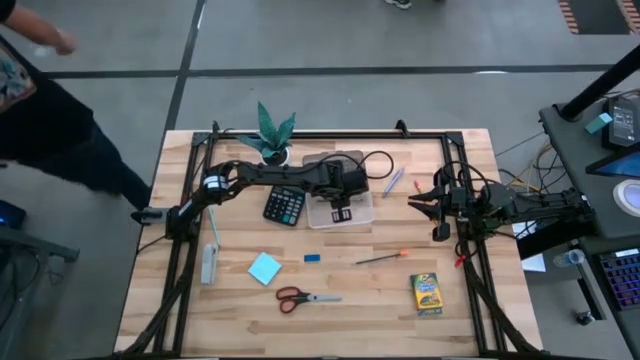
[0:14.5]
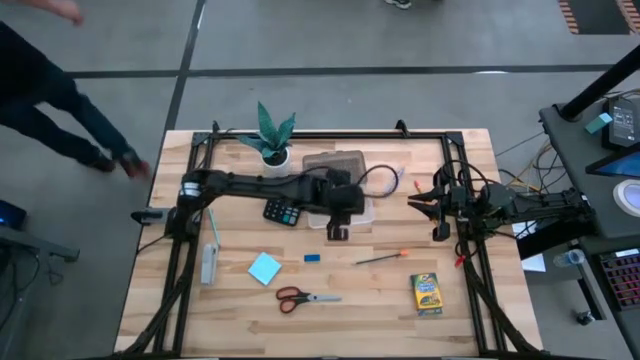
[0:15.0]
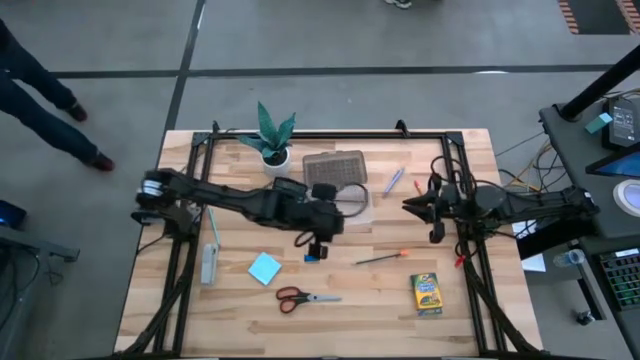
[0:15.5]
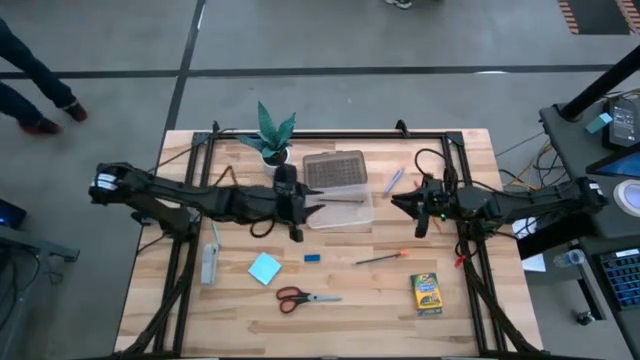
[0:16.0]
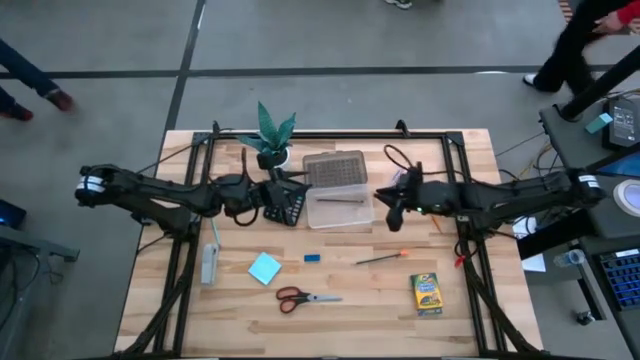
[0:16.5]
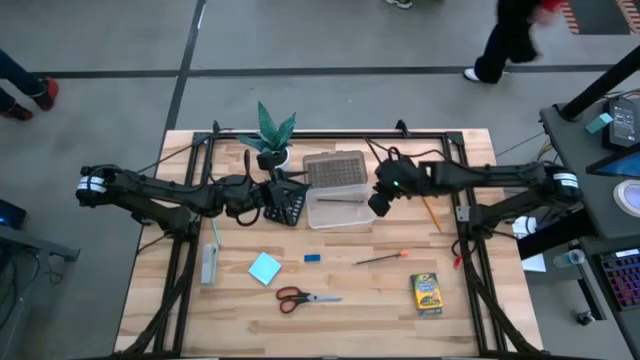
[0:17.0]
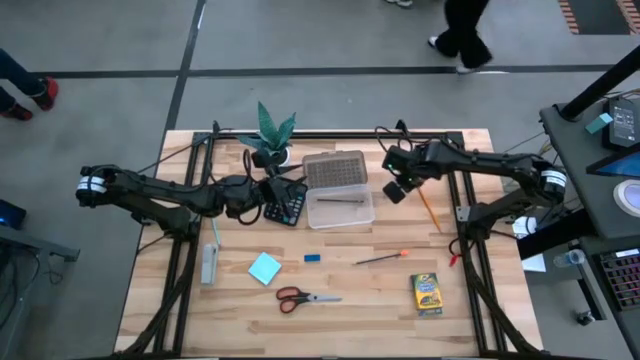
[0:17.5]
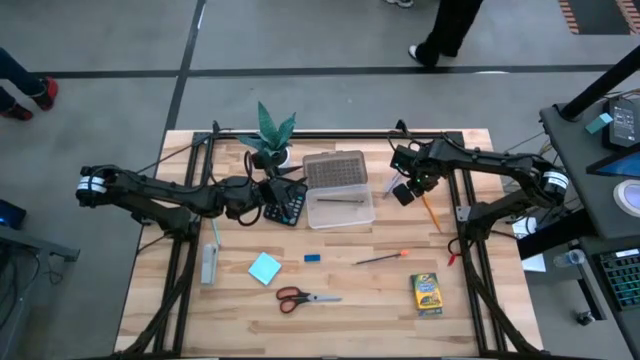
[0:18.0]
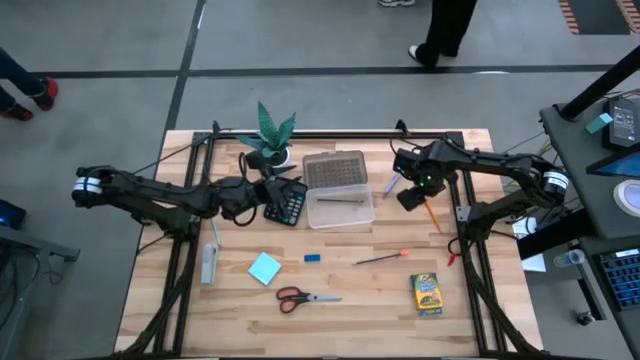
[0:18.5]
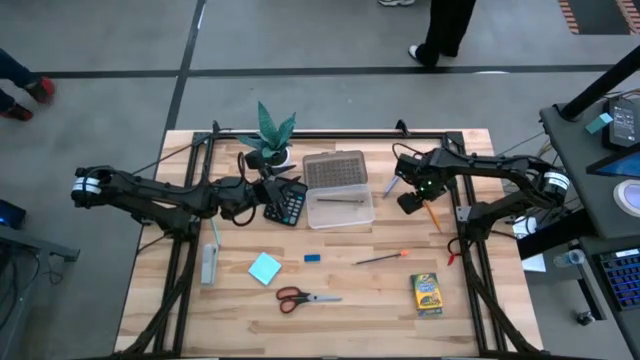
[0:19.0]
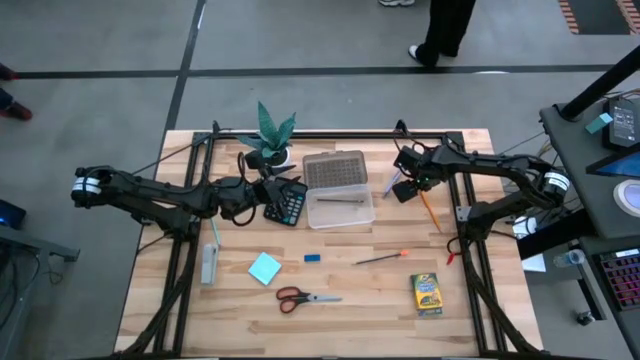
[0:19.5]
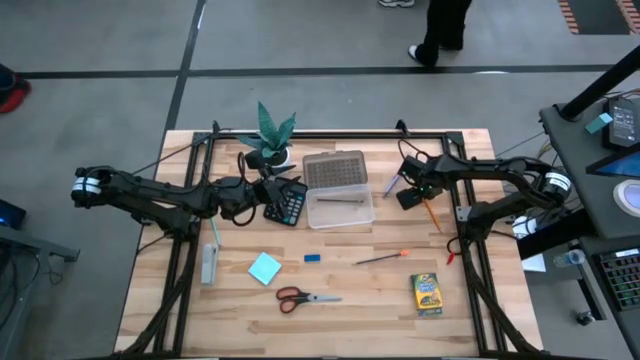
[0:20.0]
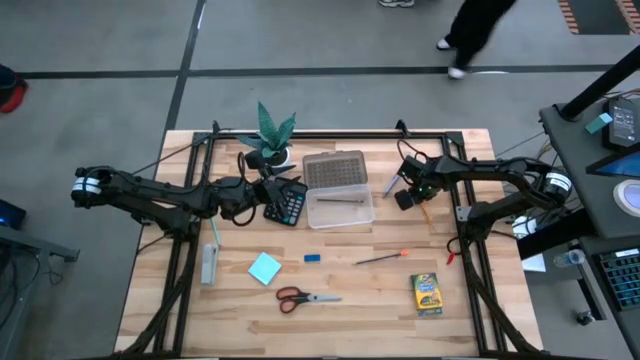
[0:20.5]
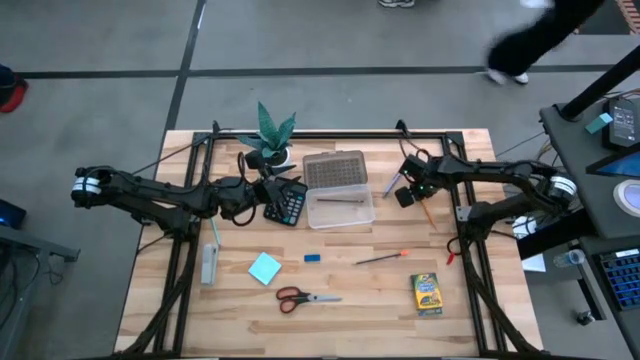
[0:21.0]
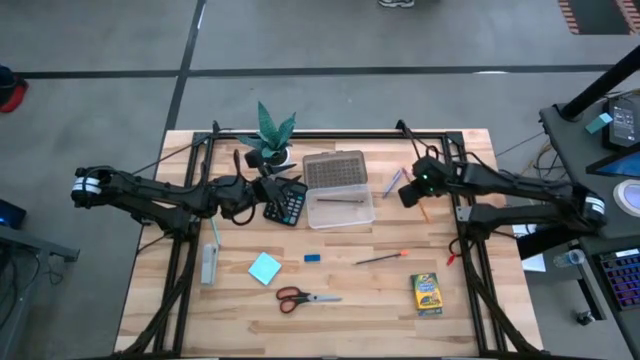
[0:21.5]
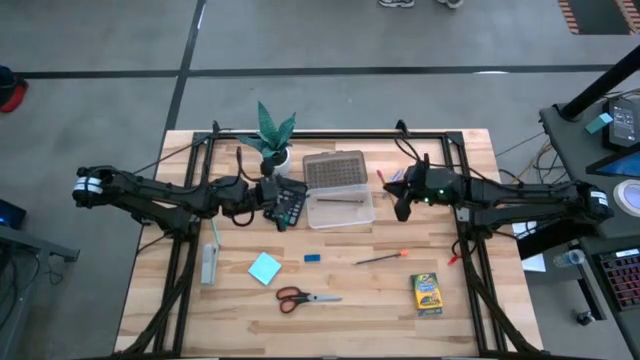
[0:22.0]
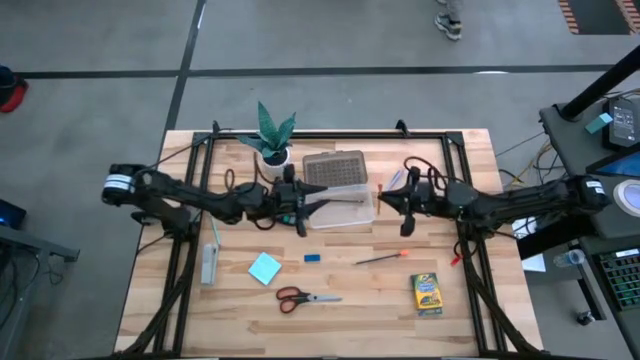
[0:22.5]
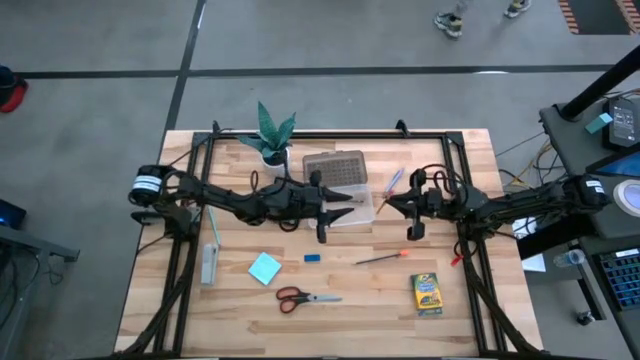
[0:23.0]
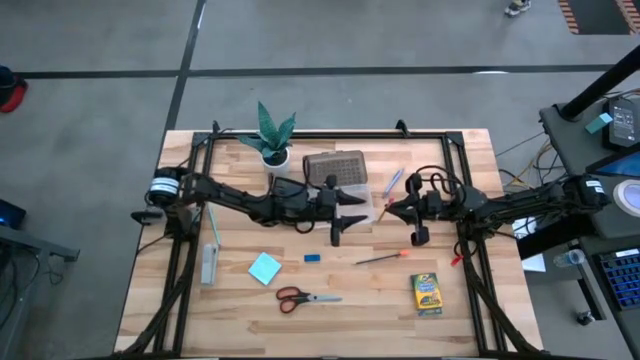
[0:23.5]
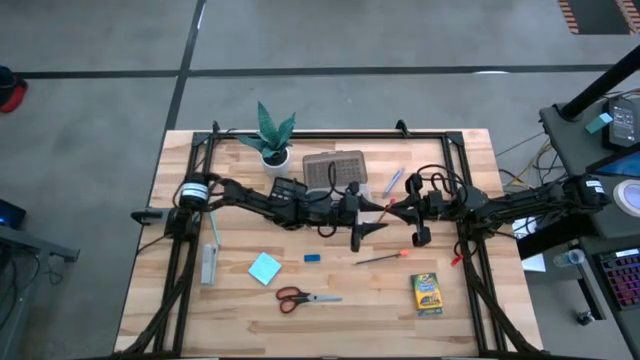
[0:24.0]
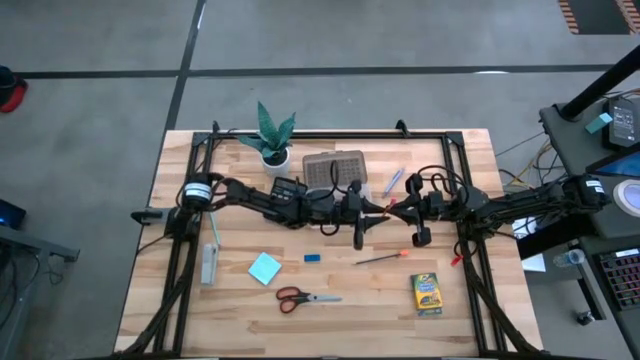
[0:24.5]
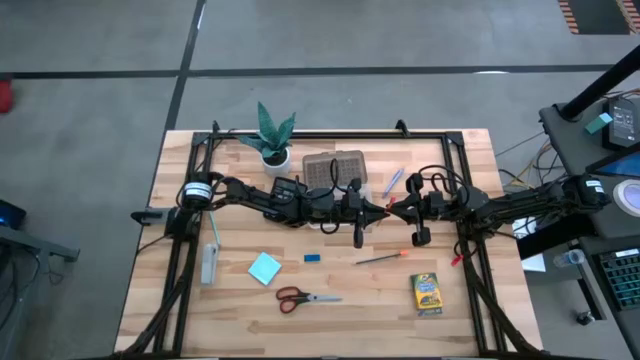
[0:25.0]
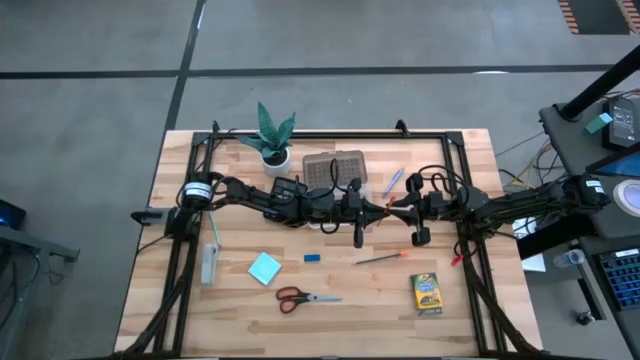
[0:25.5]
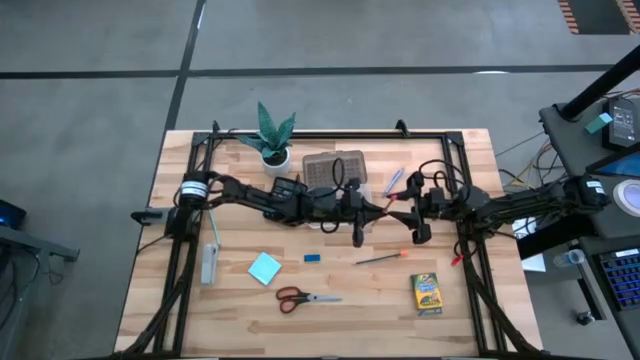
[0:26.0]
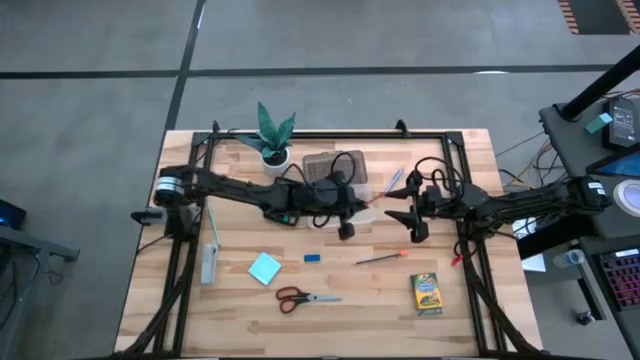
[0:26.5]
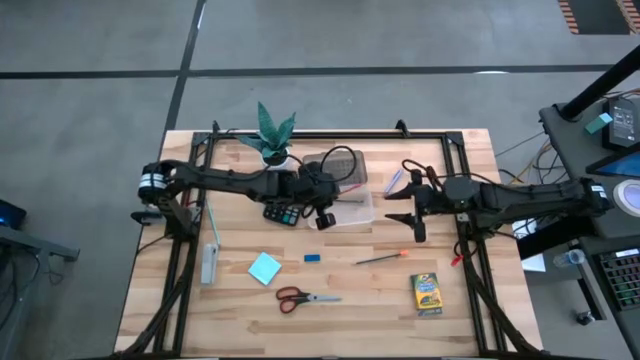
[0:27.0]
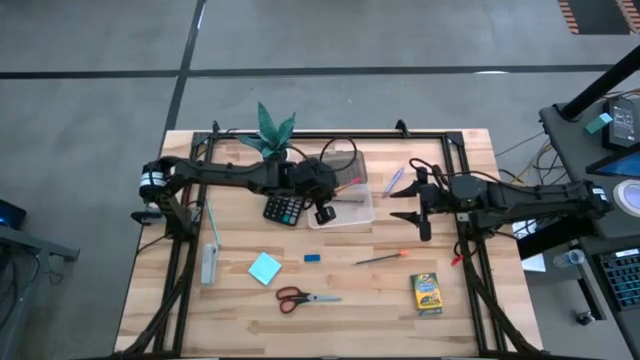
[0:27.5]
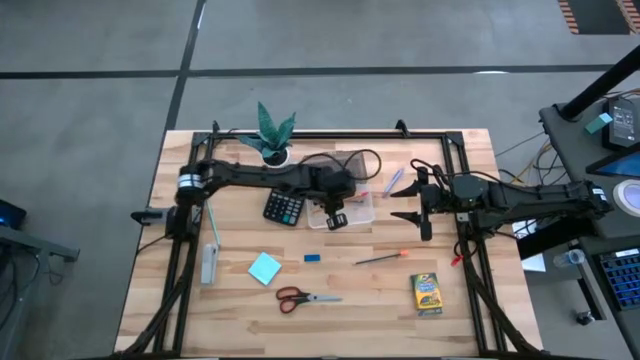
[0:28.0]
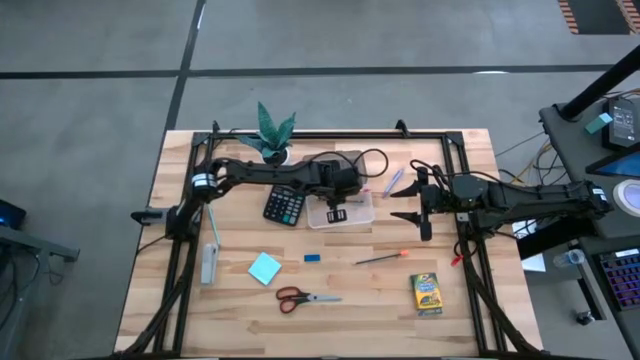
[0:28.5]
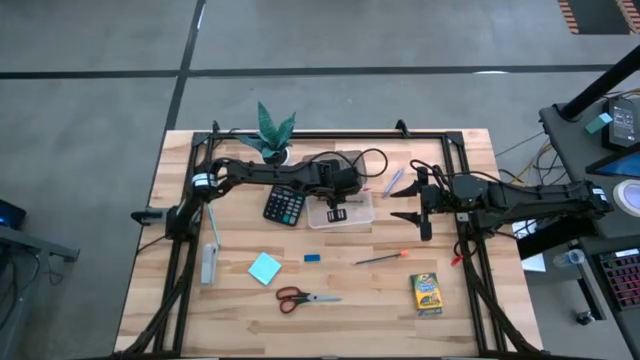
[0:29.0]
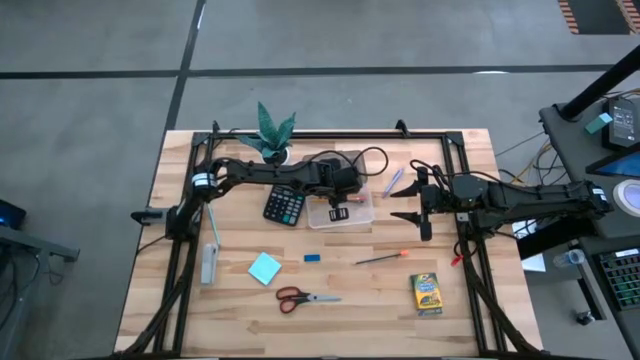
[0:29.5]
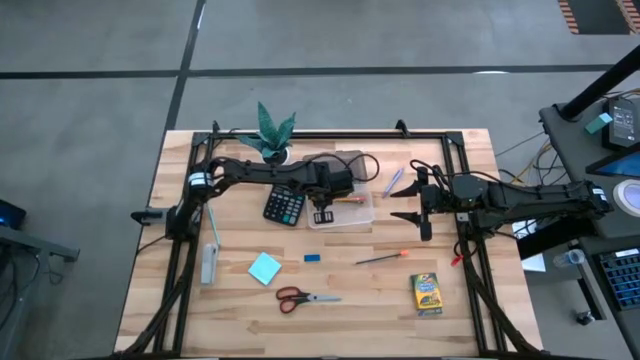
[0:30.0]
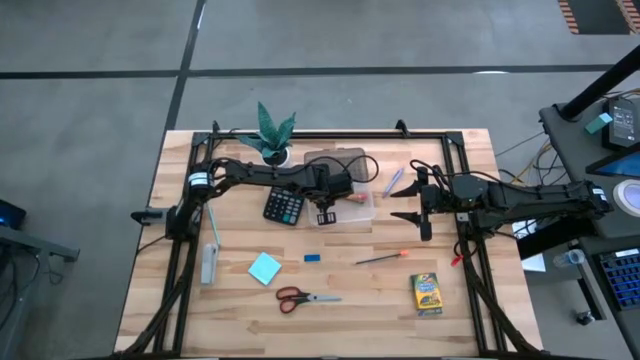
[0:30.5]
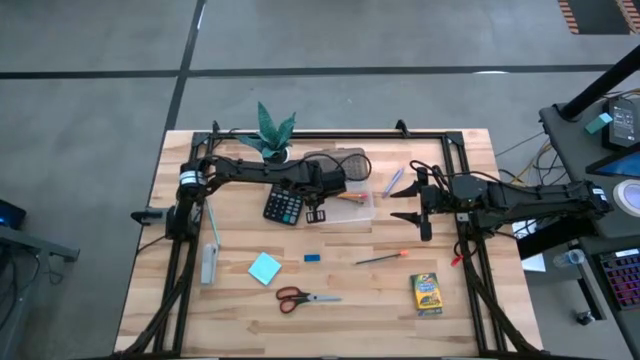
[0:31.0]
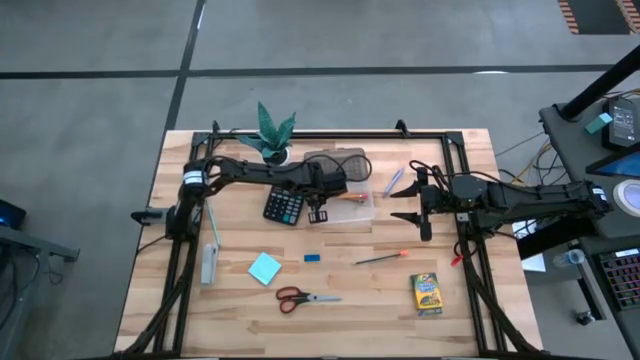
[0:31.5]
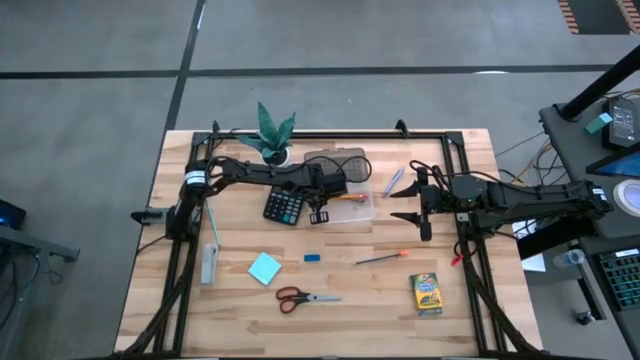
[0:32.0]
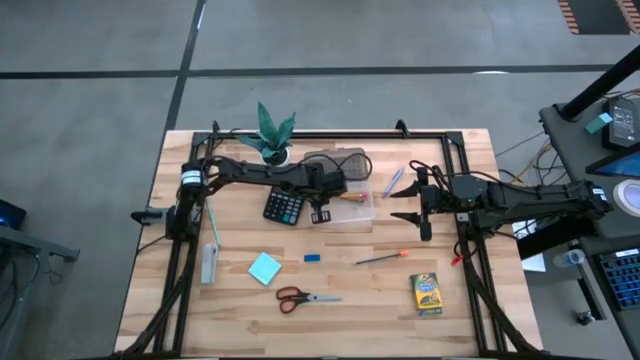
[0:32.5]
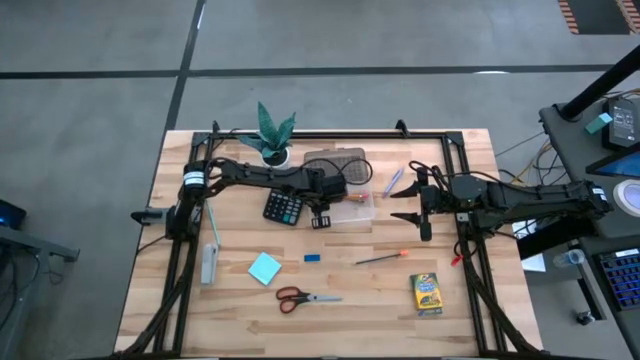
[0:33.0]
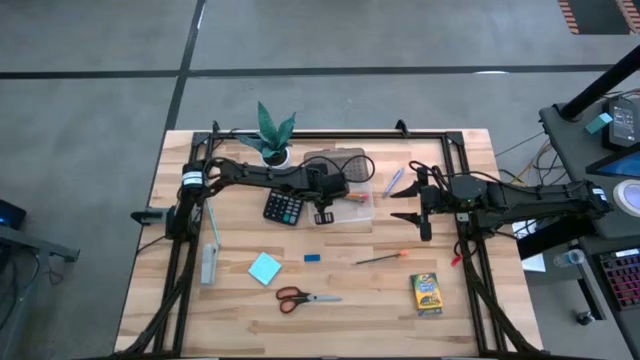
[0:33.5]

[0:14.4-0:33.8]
Task: Pack school essentials
Put the yellow pencil into the supplies box
